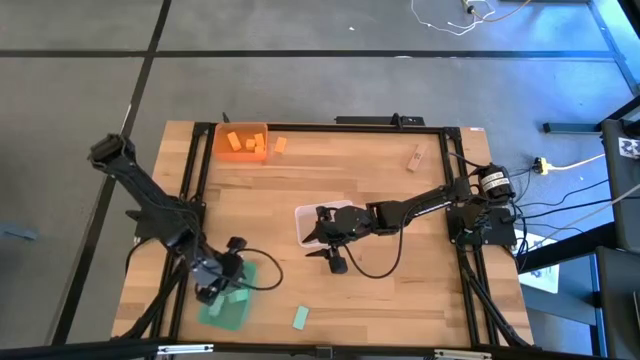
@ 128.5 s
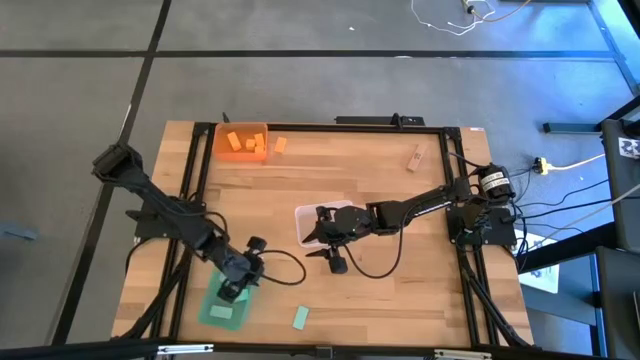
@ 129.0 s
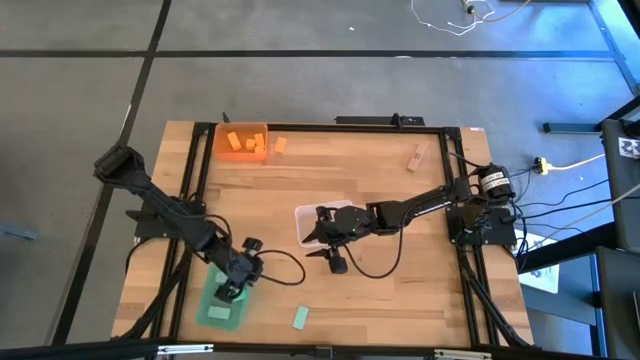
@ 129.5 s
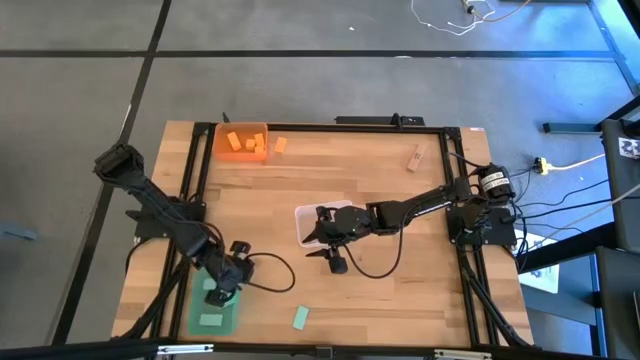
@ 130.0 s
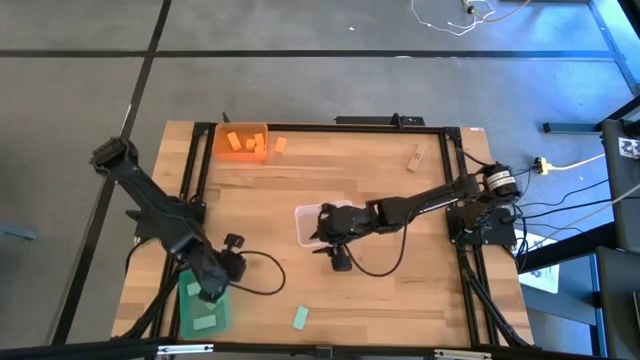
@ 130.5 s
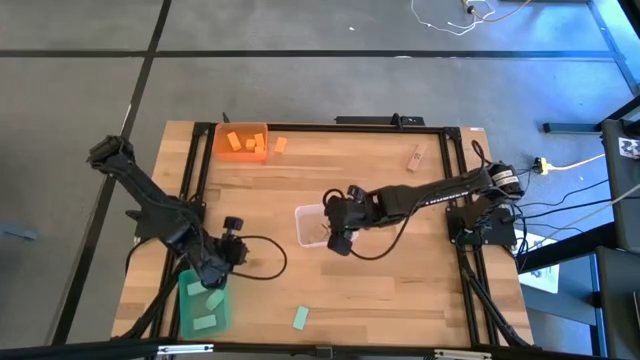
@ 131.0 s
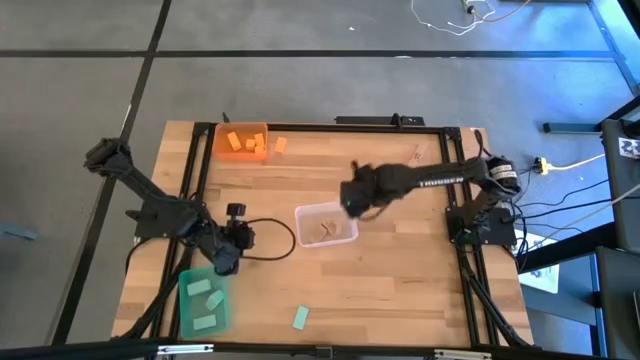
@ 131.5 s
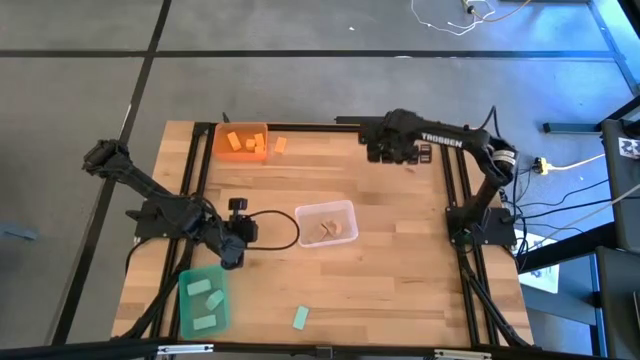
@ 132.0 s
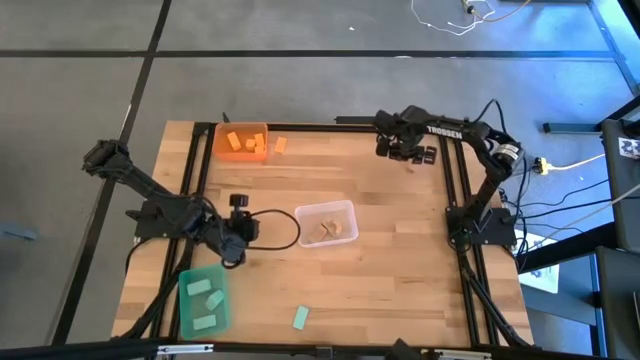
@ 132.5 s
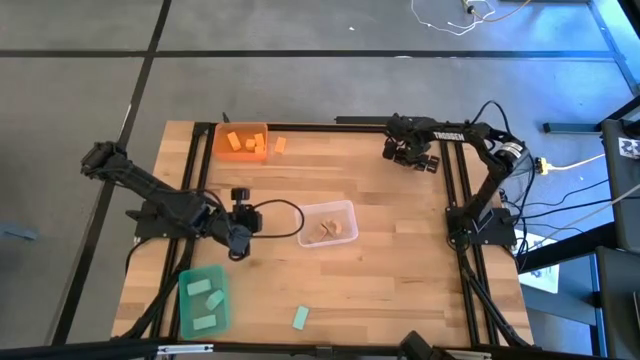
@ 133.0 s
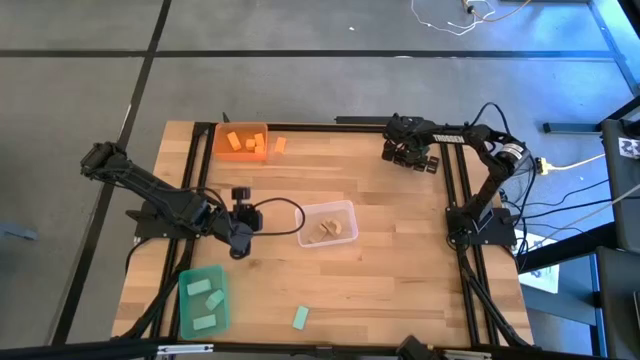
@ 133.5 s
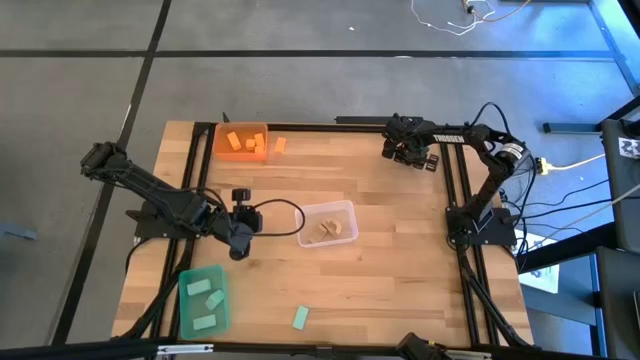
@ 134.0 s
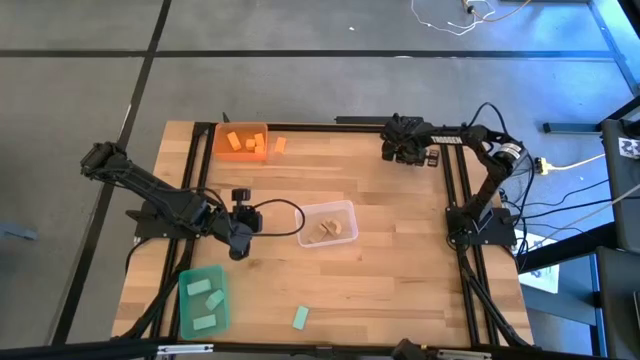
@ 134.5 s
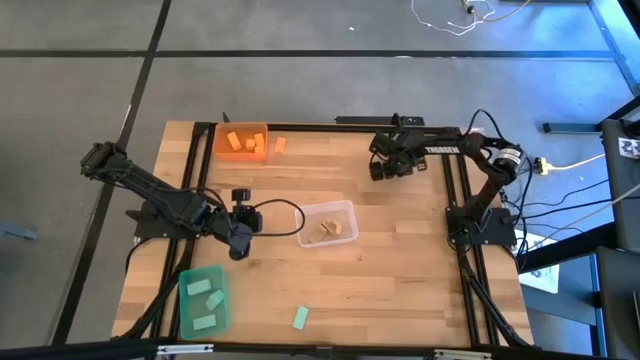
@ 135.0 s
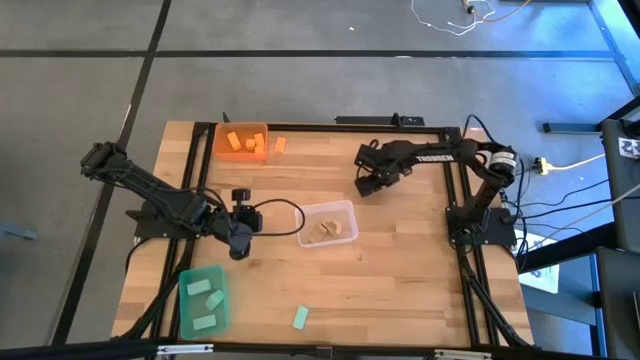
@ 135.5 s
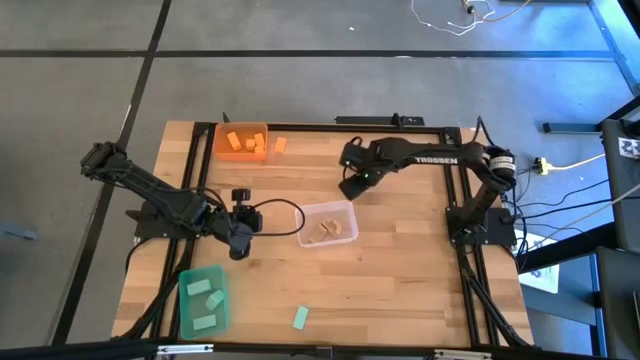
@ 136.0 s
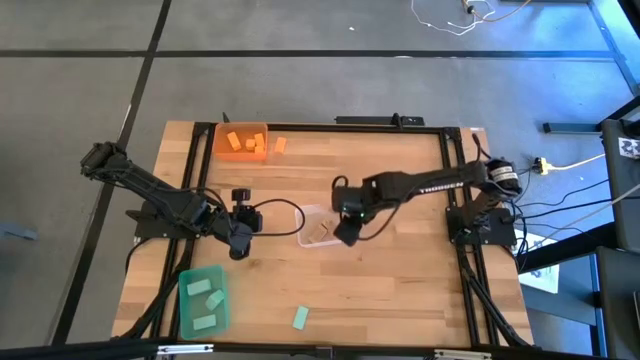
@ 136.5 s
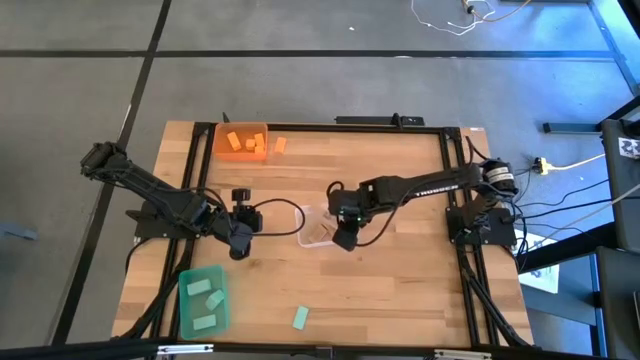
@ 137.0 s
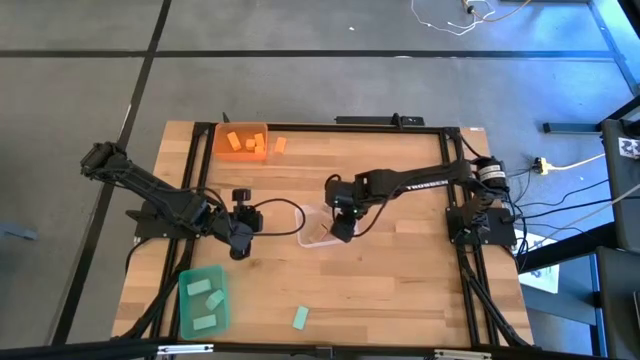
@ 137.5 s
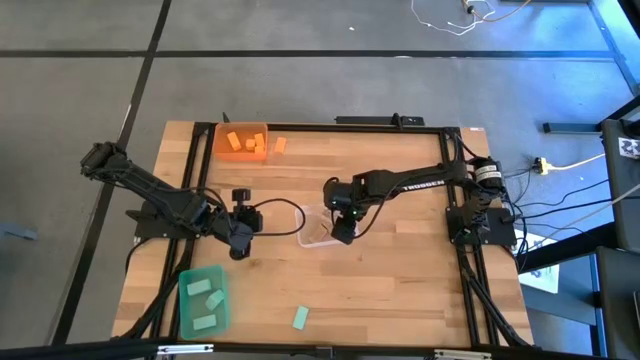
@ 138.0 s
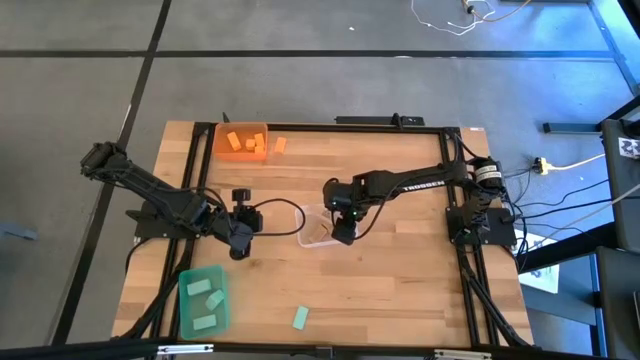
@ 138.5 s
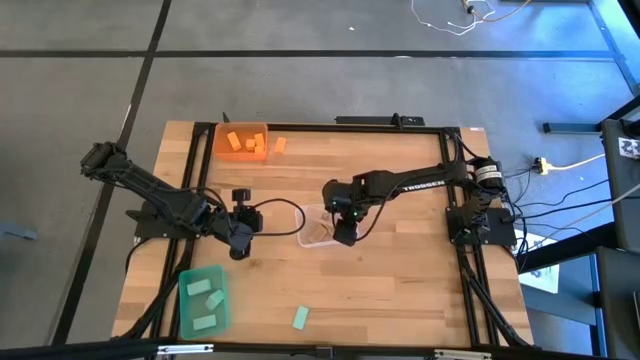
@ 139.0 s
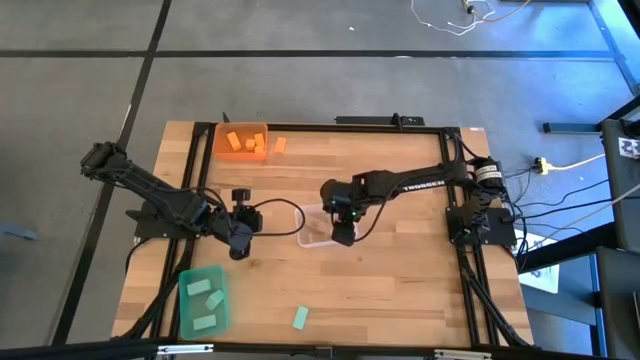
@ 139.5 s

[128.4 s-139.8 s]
Task: Sort & place blocks by color
Put the light brown block into the white bin

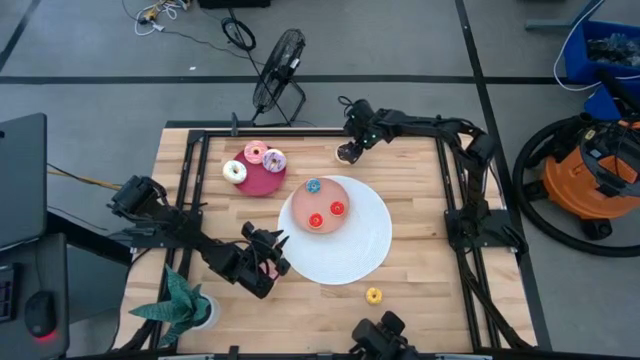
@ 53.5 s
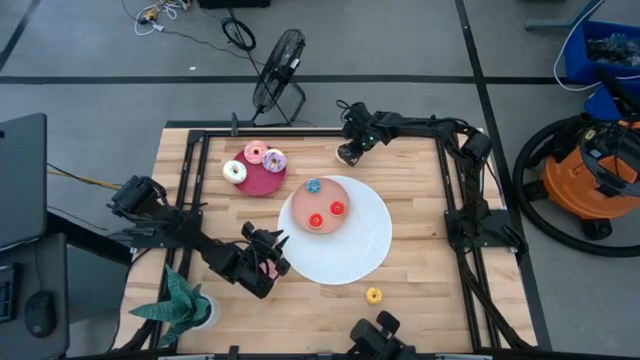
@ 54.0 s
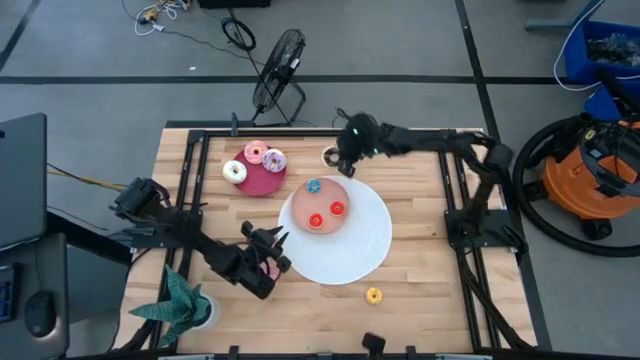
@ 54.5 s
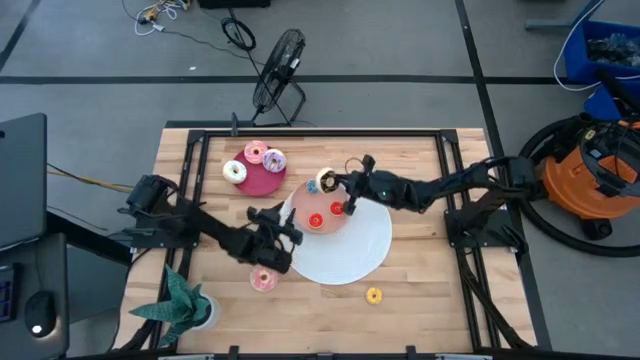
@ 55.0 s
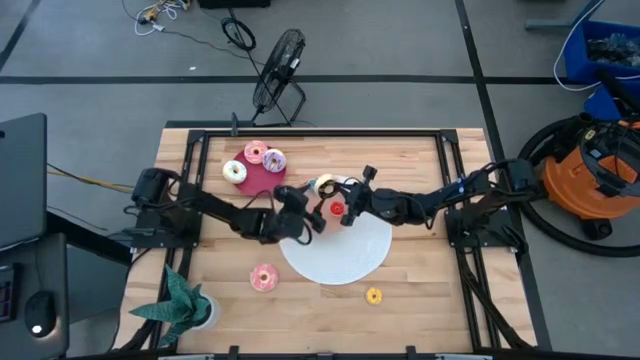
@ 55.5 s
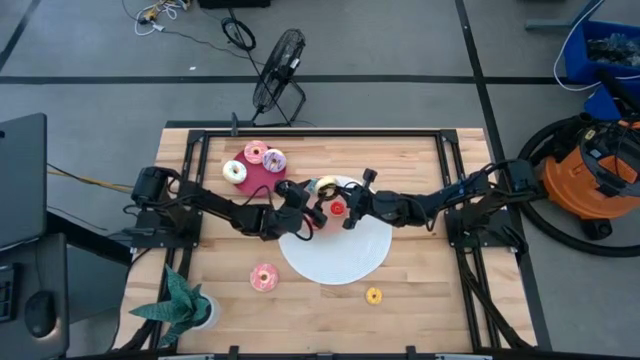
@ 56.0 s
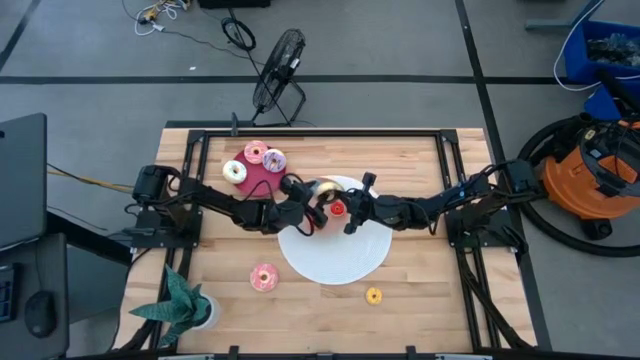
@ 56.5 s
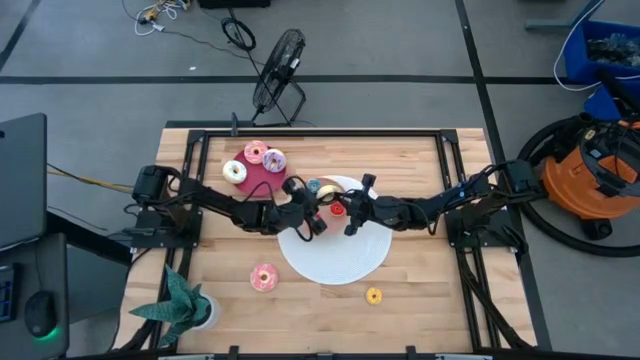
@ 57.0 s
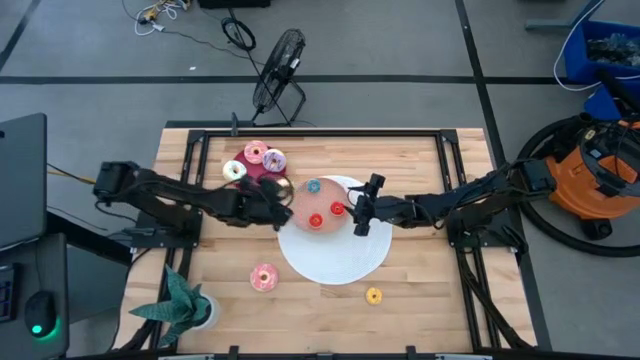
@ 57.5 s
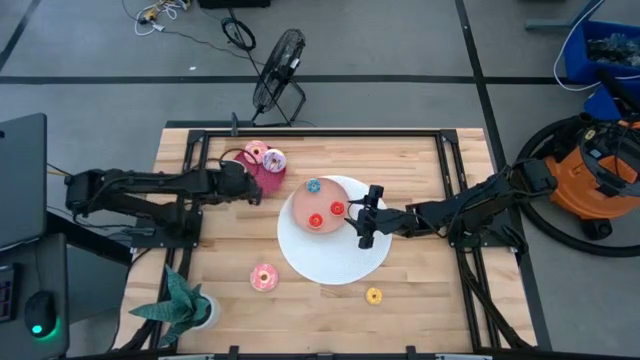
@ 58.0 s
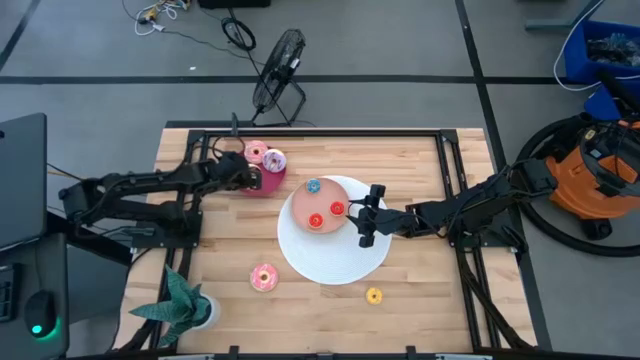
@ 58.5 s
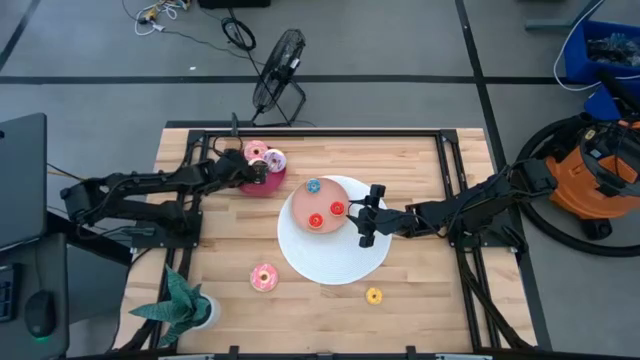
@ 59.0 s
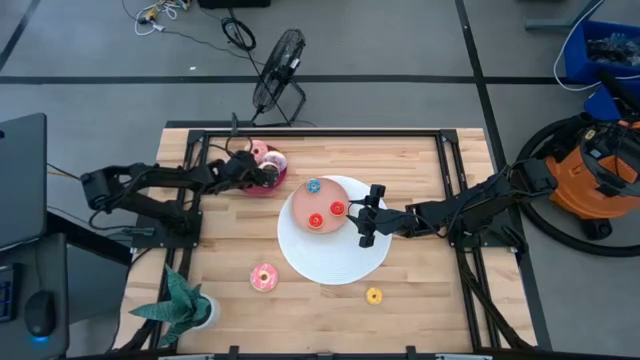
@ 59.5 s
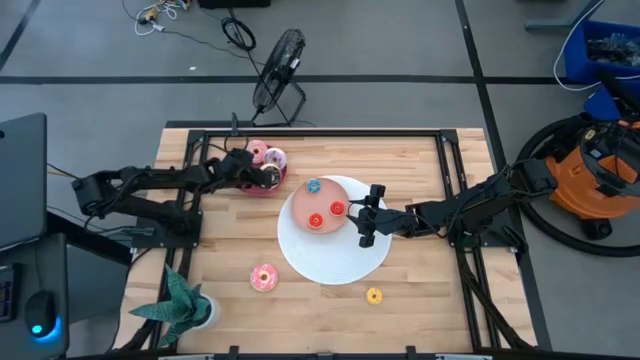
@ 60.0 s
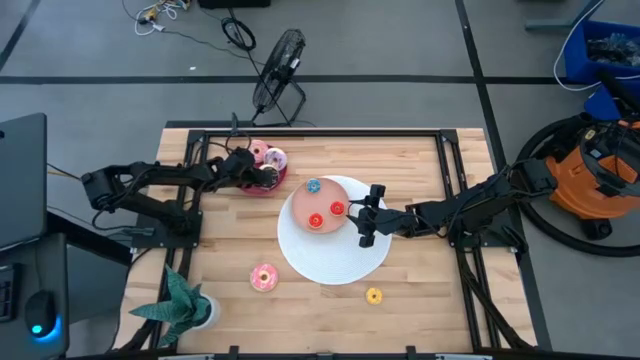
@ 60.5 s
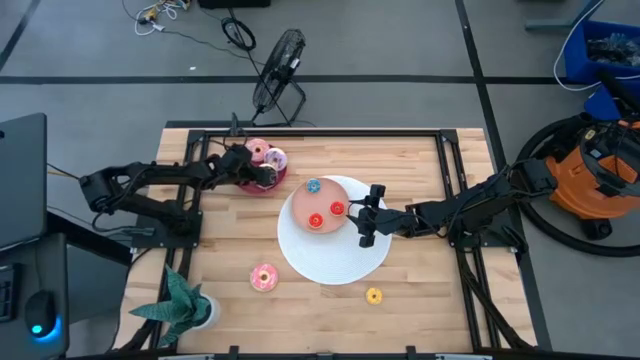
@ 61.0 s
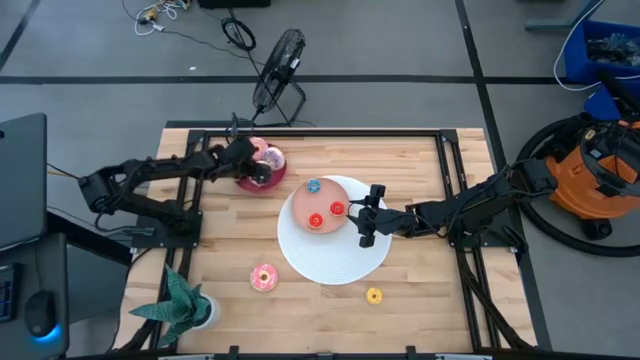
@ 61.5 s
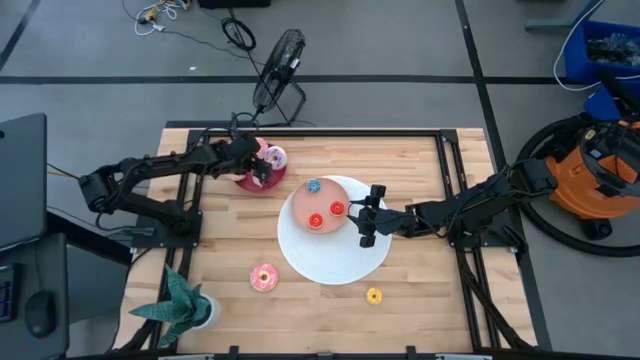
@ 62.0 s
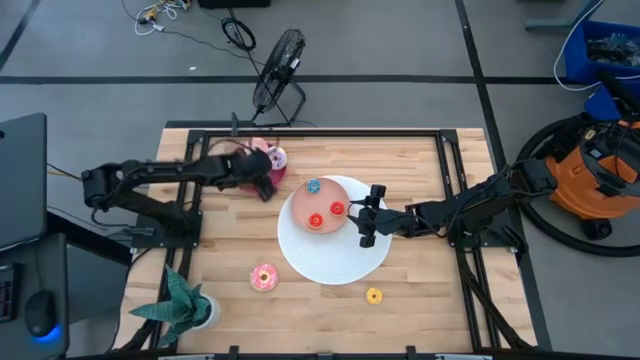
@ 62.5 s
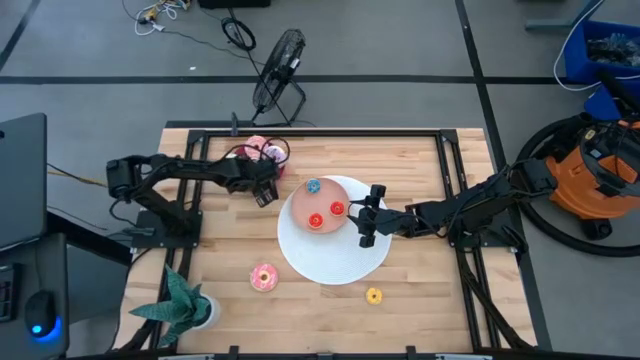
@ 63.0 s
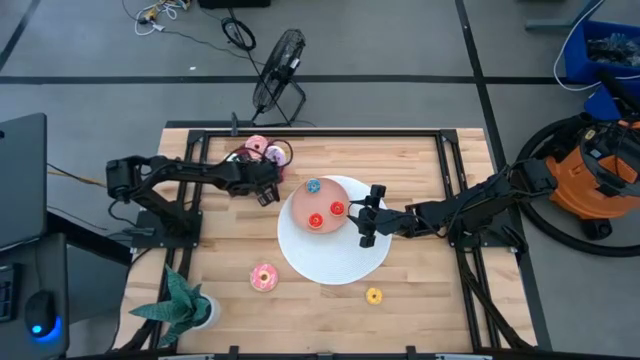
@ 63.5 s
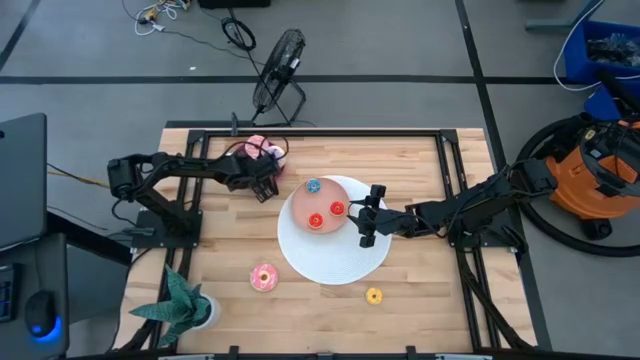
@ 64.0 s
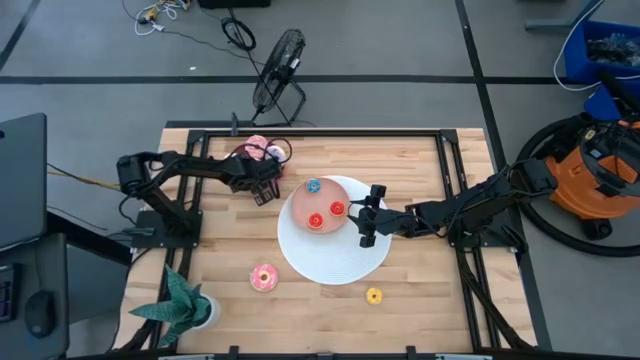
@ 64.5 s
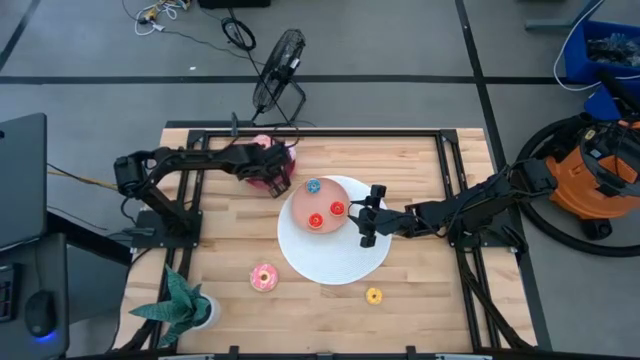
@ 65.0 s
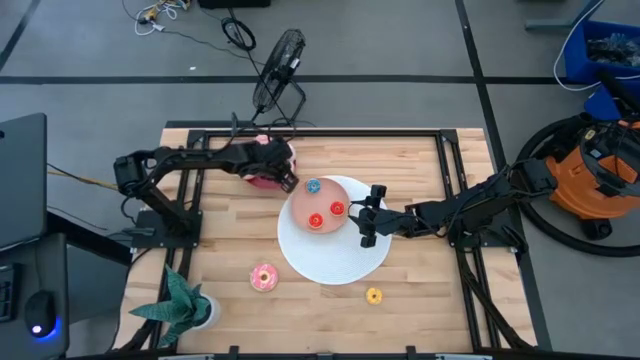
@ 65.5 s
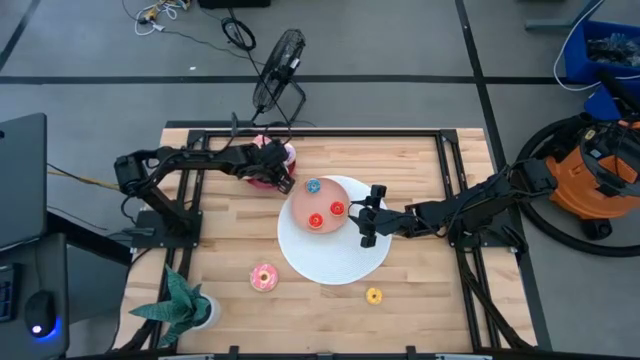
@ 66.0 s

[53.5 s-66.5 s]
Task: Pick & Place donuts
Put the big brown donut on the dark pink plate
